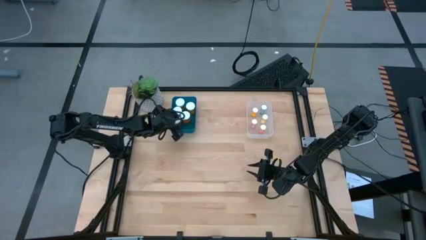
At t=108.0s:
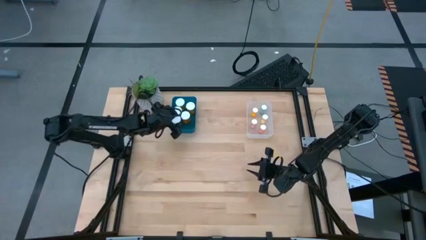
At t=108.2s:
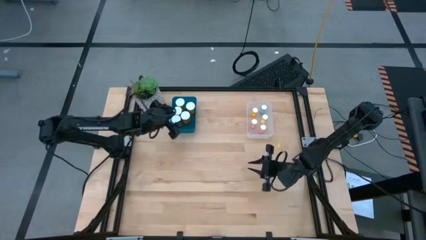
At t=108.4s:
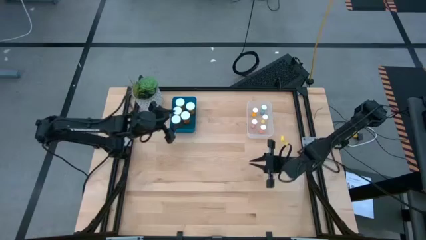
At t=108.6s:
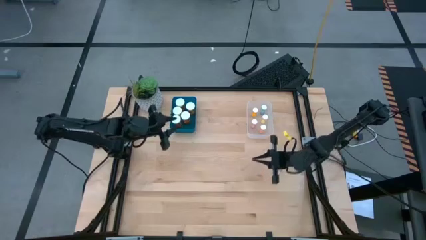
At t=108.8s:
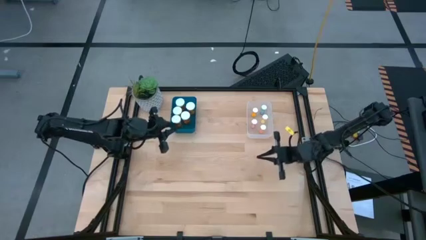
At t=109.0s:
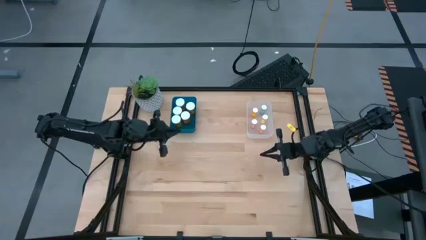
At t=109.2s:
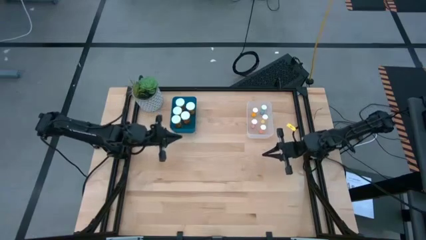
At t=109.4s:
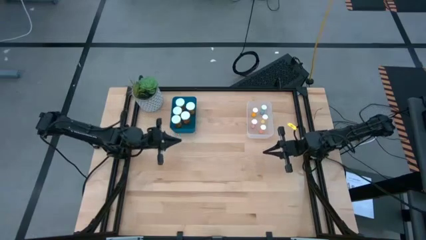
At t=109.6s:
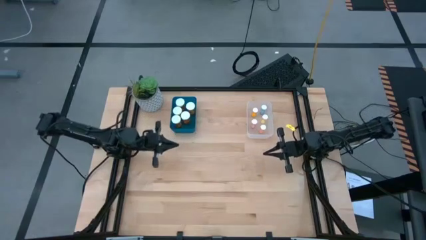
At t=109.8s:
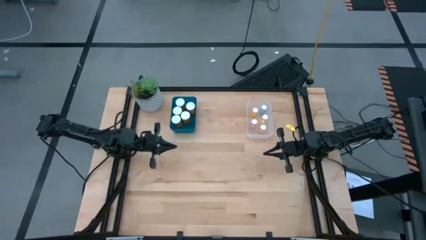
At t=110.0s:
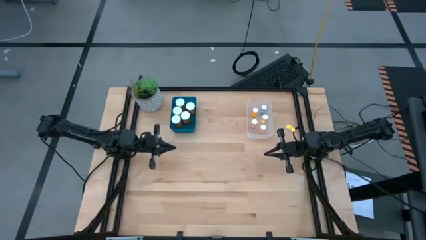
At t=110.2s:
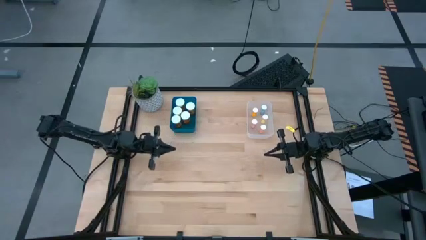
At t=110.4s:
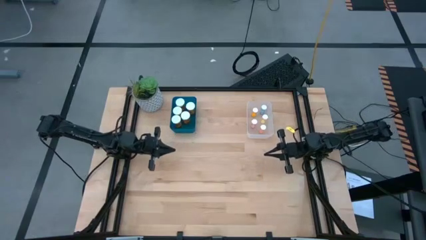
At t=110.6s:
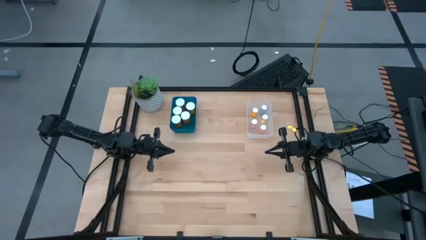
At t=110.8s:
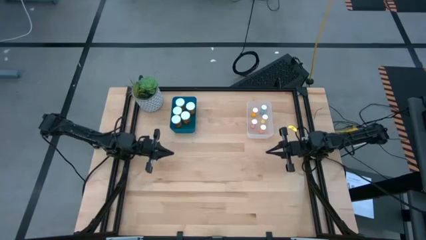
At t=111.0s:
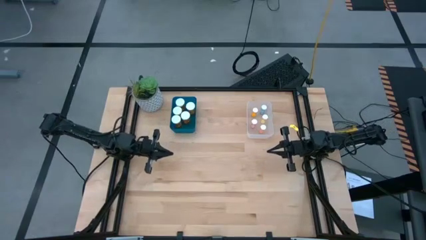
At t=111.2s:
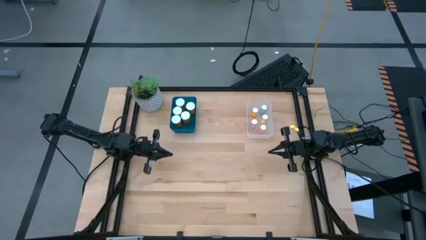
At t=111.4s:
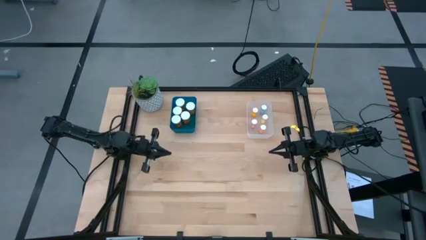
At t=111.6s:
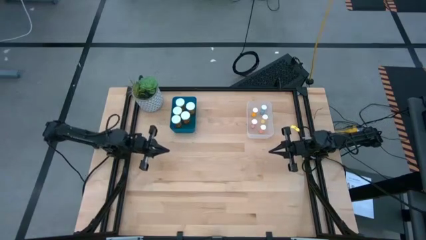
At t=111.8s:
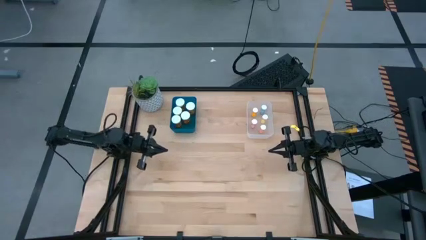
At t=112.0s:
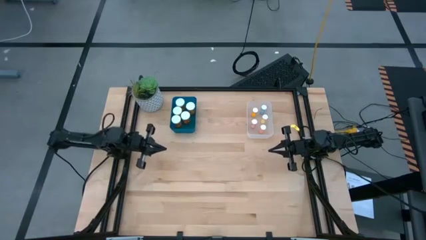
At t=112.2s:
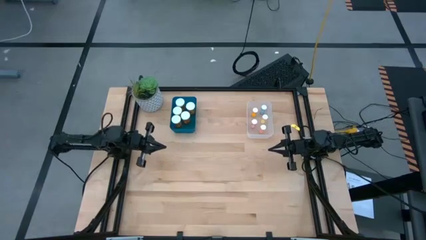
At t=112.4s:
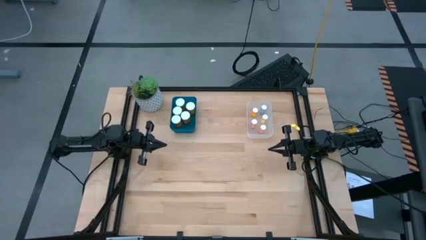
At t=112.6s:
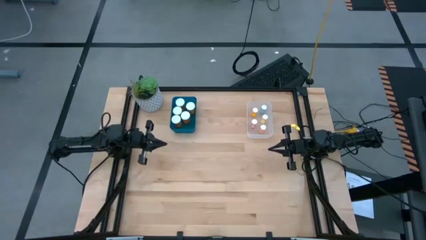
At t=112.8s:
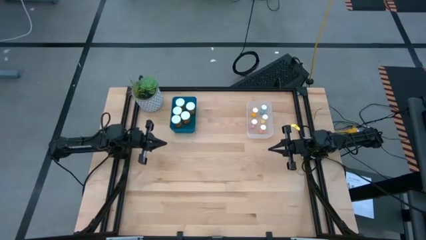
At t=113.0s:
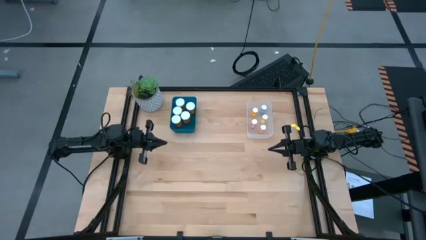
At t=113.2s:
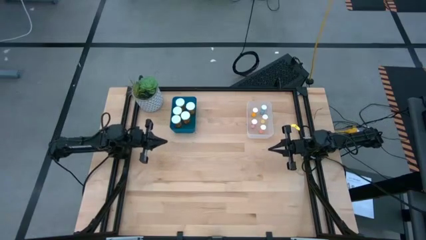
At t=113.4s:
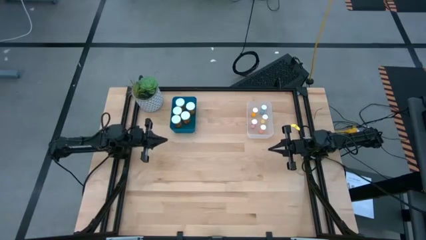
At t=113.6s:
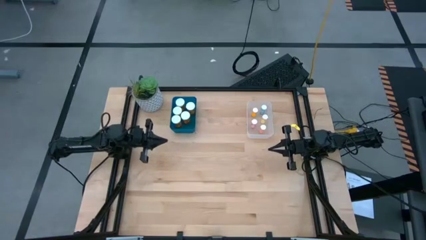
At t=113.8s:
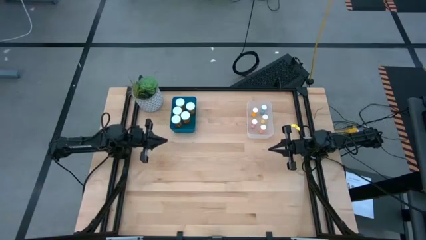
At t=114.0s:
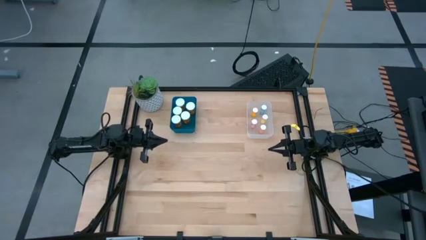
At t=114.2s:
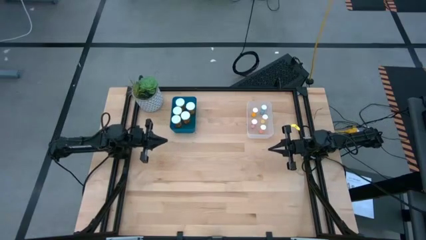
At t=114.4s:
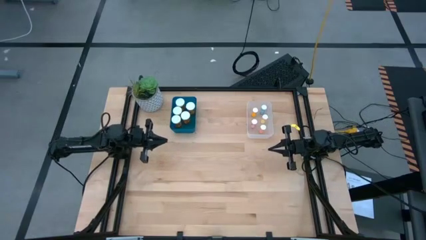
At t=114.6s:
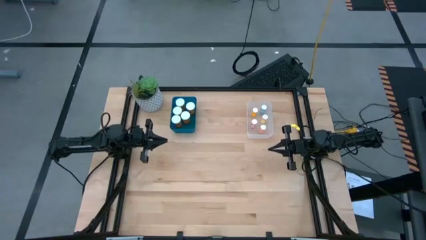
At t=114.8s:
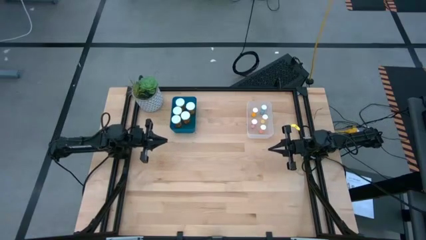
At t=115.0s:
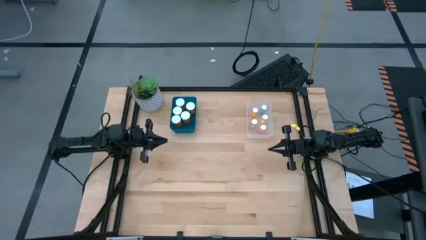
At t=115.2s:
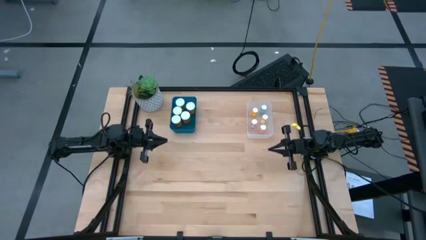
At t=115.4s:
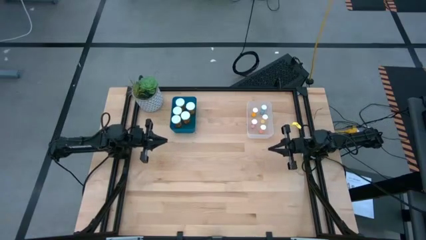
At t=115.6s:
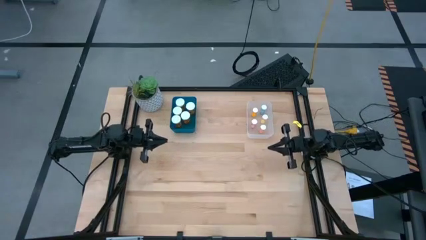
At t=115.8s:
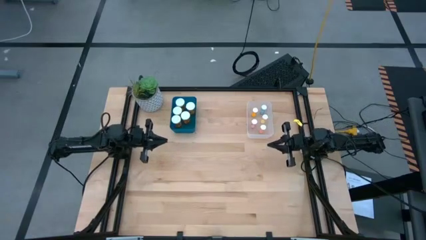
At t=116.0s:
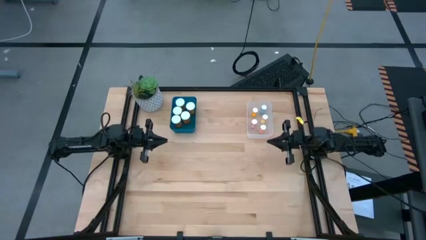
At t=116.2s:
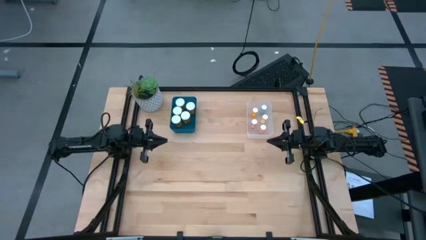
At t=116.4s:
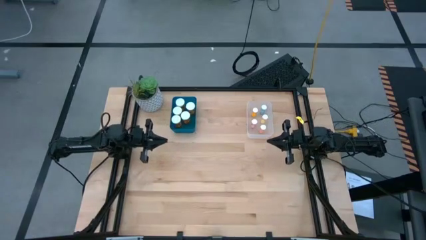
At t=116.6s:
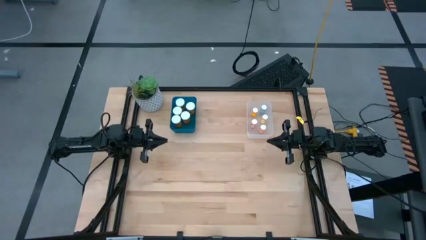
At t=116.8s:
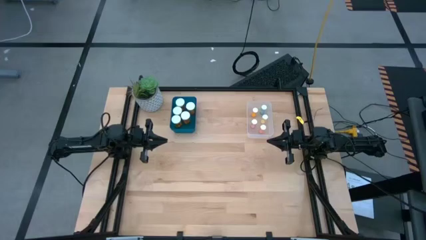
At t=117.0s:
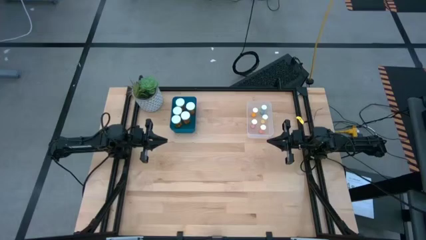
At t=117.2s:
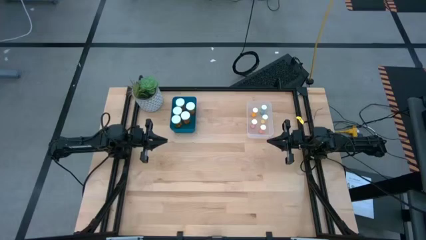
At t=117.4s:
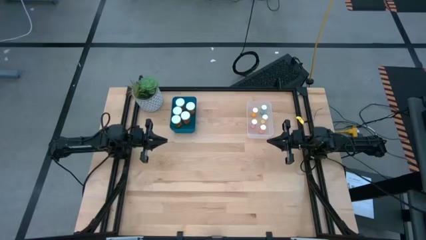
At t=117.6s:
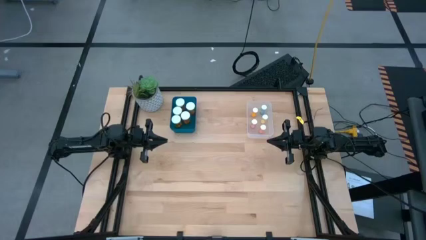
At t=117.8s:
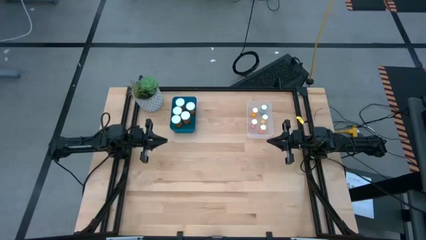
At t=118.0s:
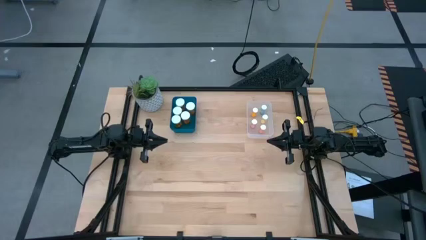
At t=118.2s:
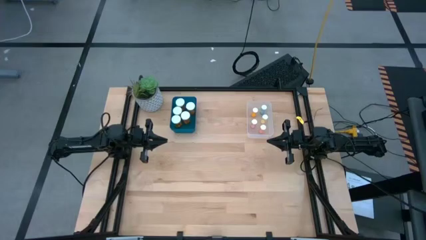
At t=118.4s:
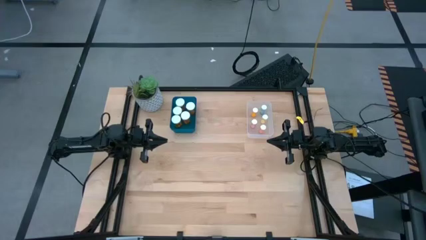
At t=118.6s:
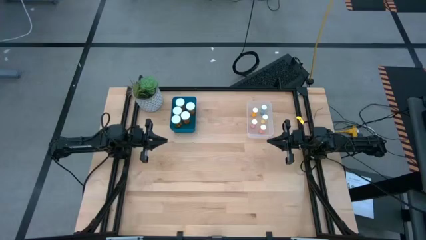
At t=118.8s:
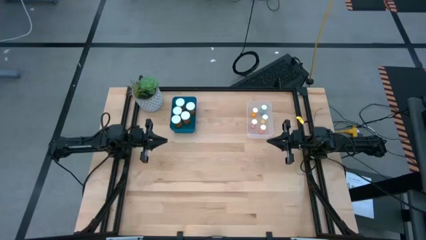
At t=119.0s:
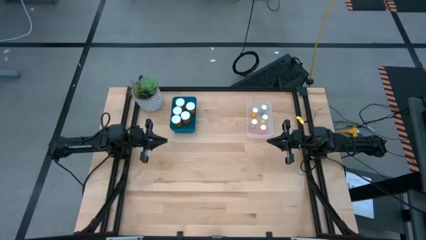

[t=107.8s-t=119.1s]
Task: Pick and place medicine bottles into bin by pill shape (circle, oval)
Return to Home Position

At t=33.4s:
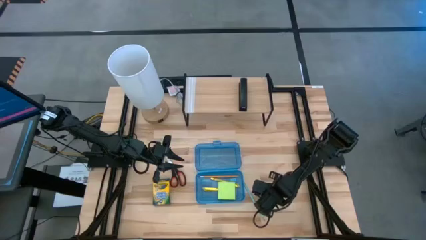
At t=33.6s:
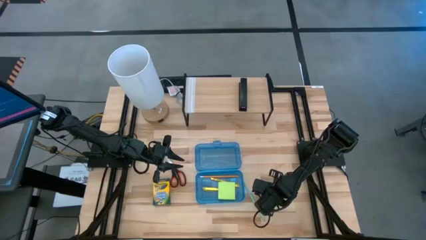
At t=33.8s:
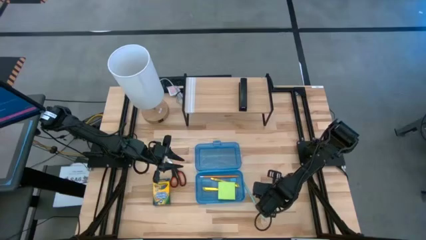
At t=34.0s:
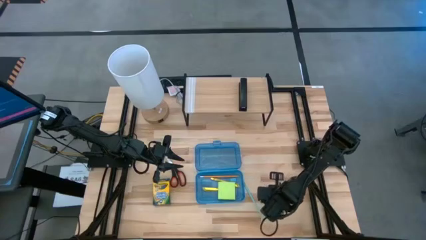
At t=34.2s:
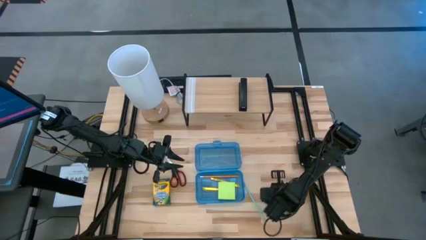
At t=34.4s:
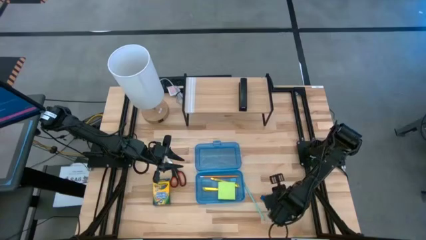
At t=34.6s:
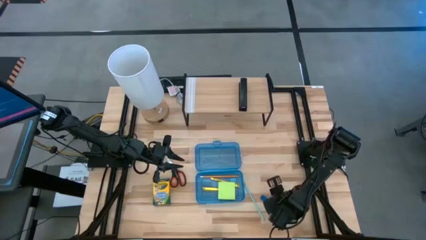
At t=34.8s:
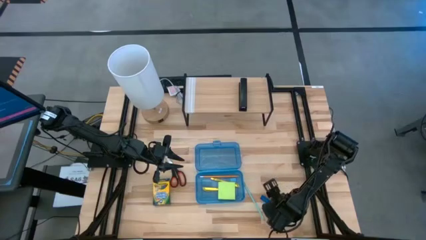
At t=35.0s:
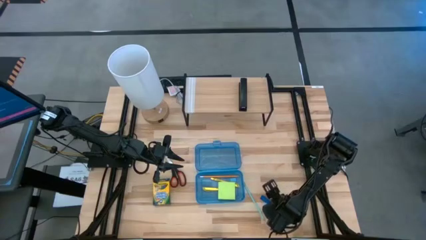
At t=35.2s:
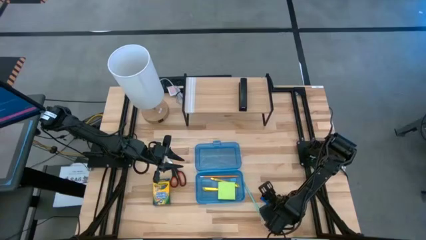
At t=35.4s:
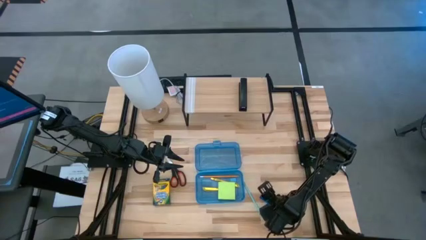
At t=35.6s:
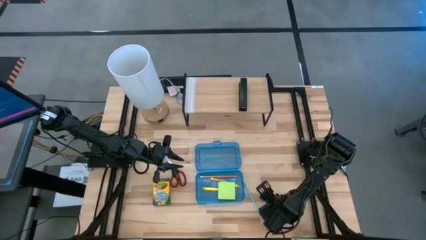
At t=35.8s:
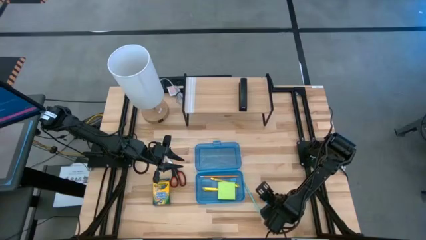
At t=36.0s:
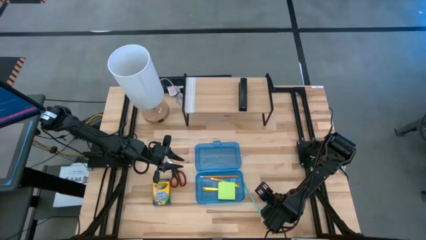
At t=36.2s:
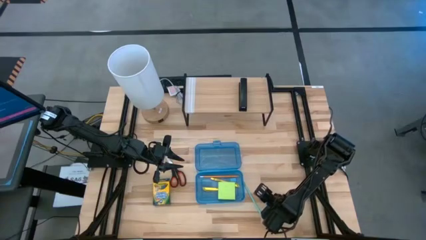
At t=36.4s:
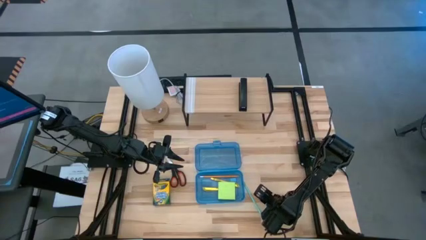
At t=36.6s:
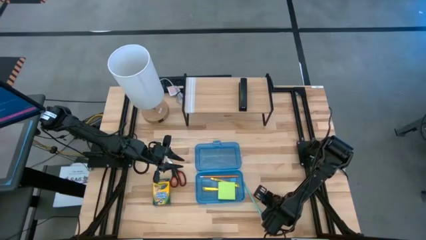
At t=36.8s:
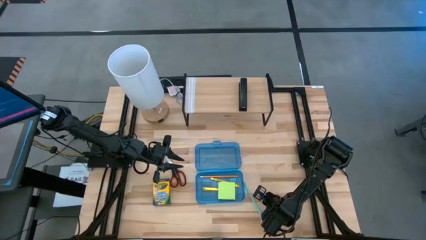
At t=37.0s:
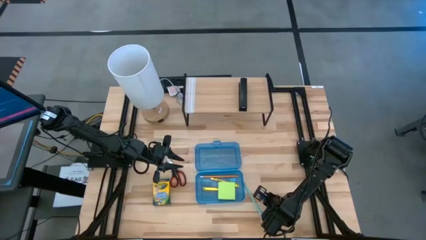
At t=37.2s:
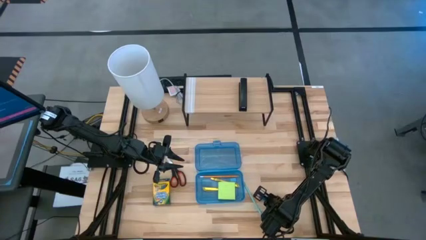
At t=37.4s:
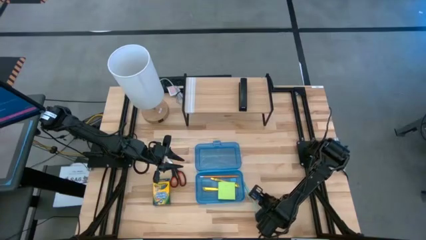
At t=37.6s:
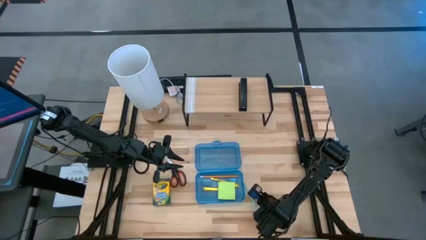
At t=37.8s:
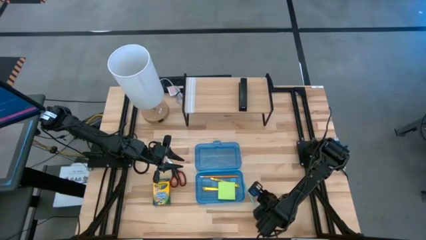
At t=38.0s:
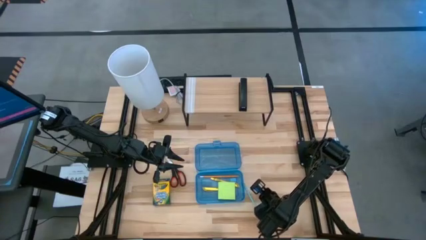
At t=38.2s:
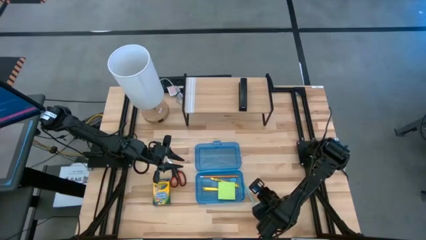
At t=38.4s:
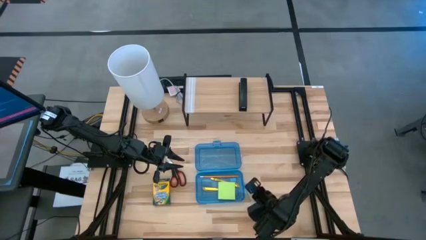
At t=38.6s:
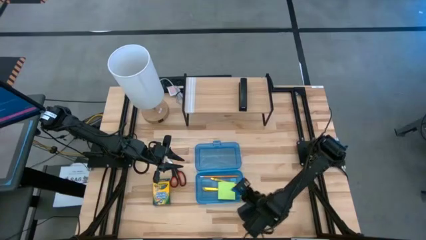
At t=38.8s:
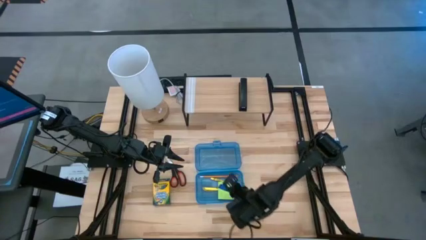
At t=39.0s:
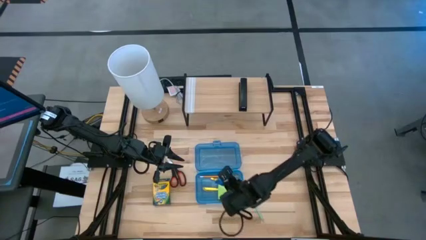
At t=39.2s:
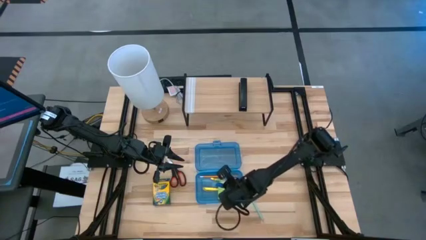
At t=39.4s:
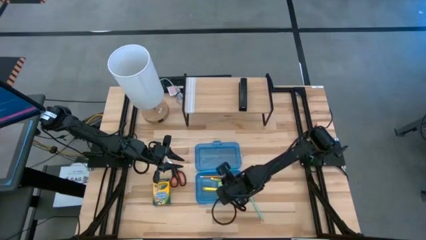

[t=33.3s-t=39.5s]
Task: Pack school essentials
Put the blue eraser into the blue supply box
